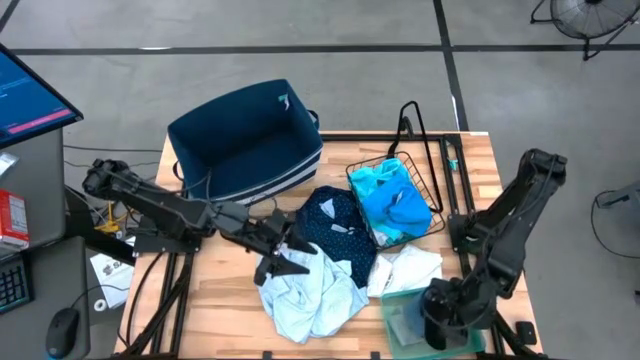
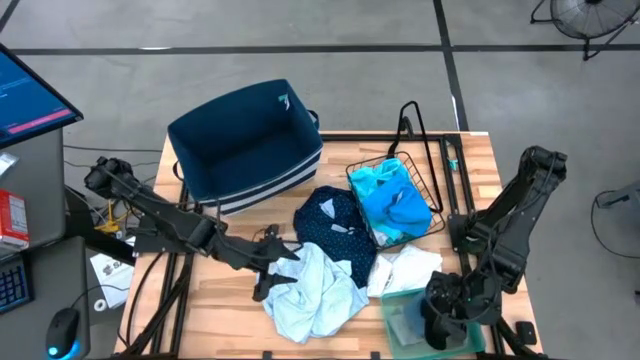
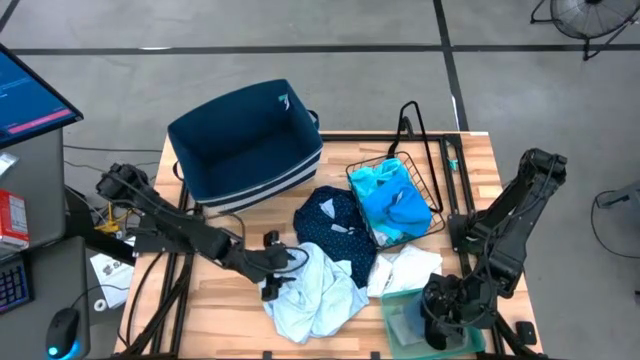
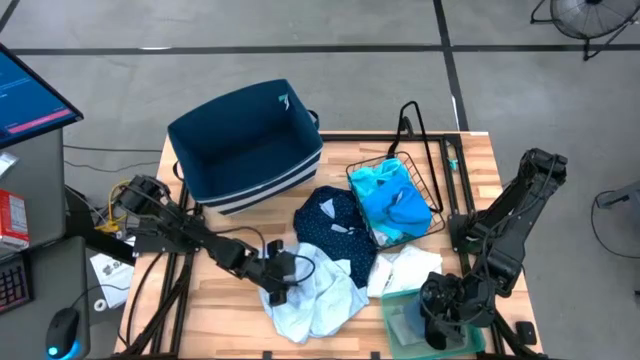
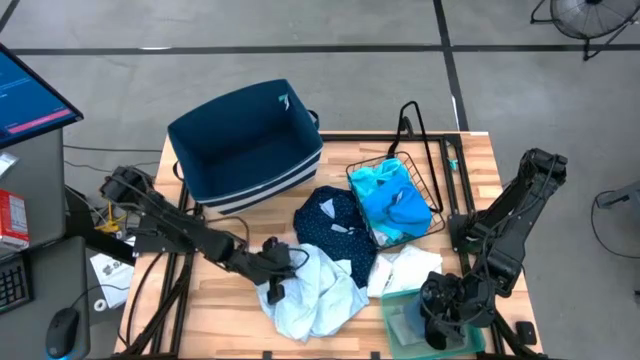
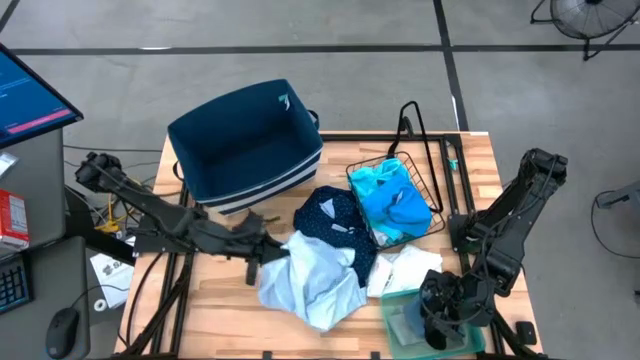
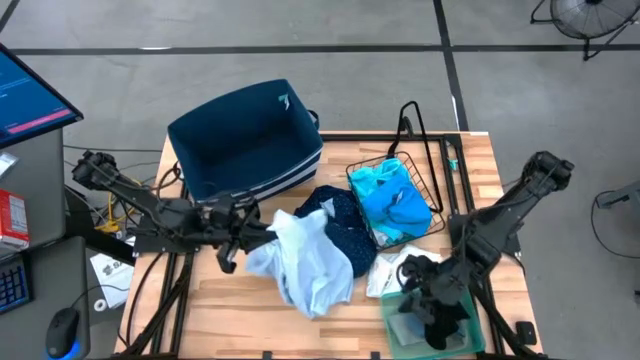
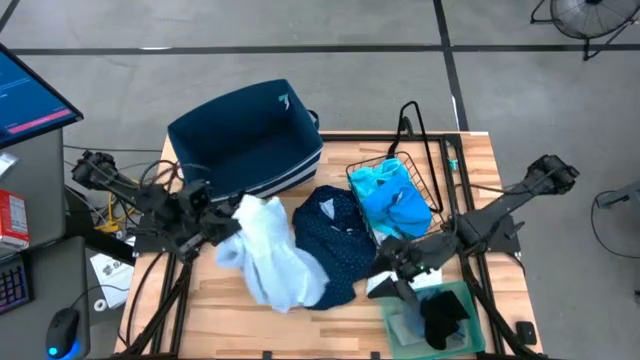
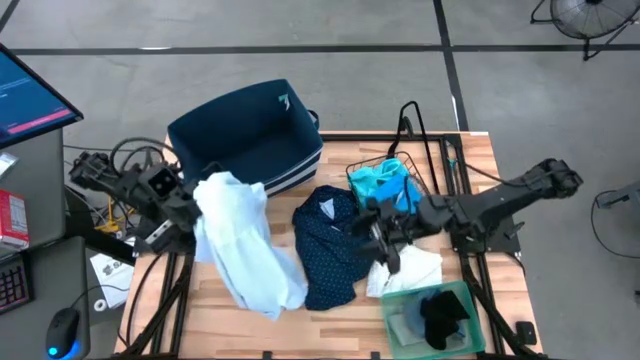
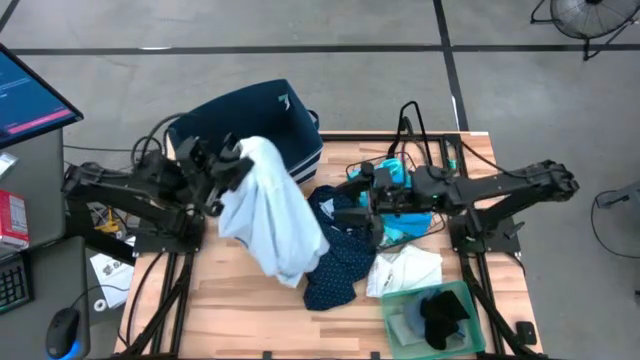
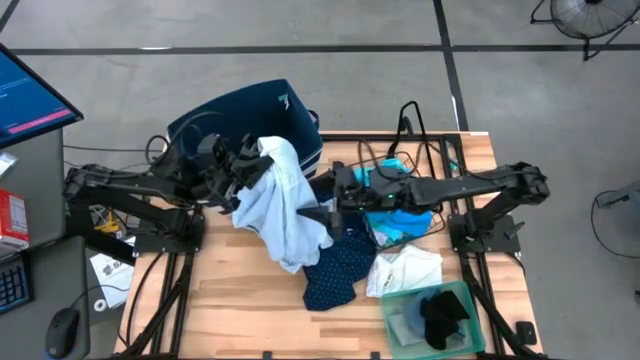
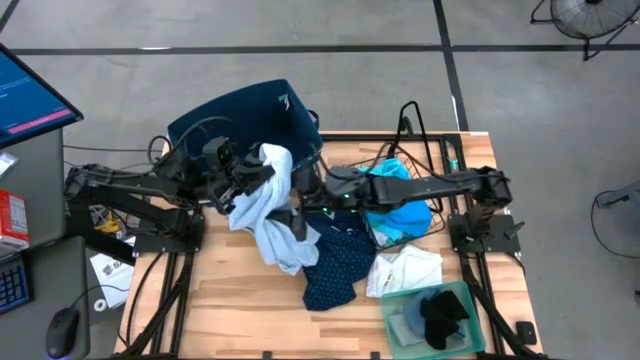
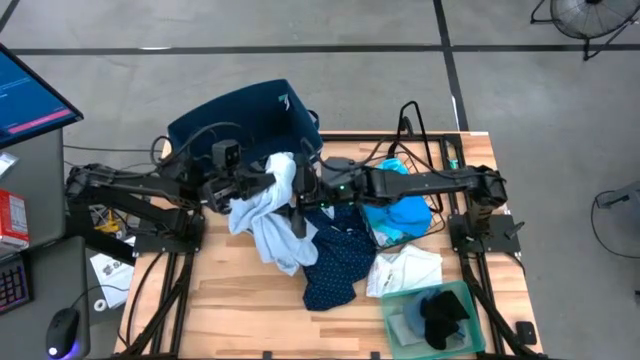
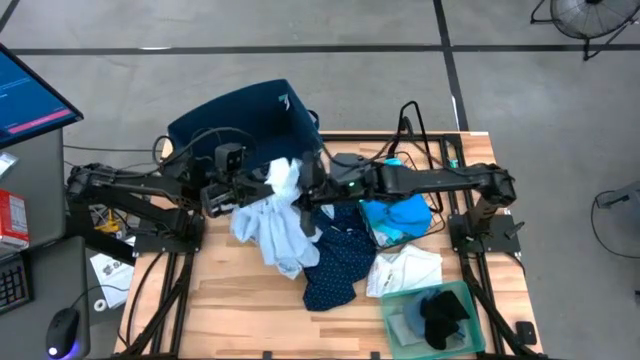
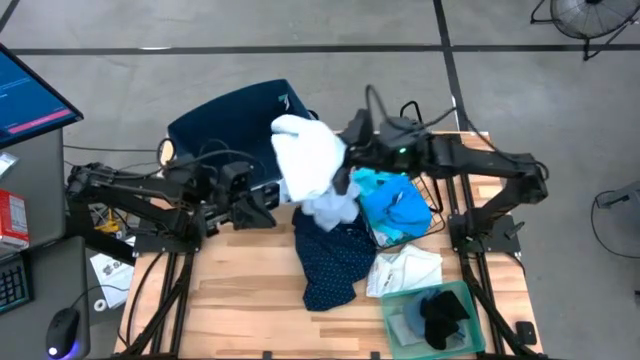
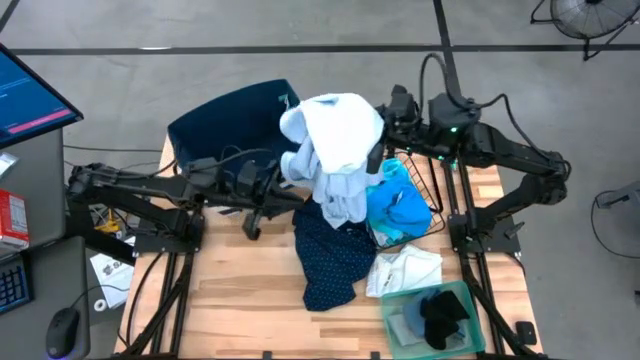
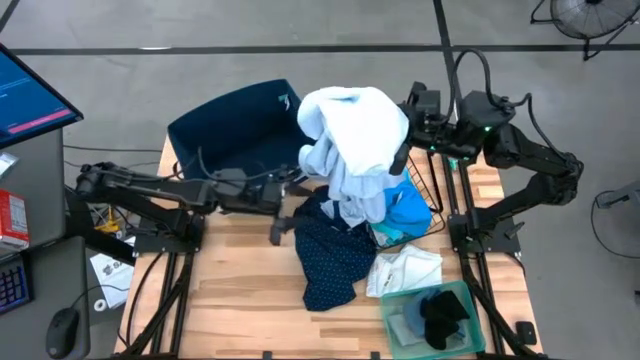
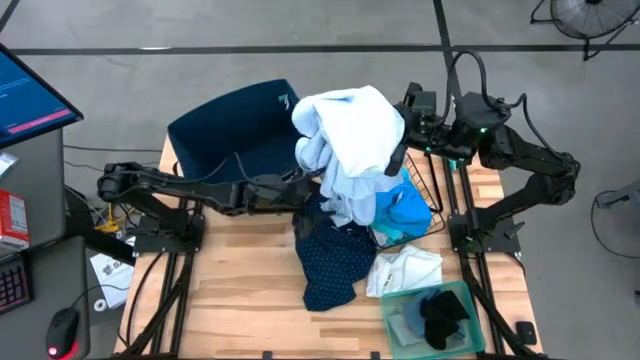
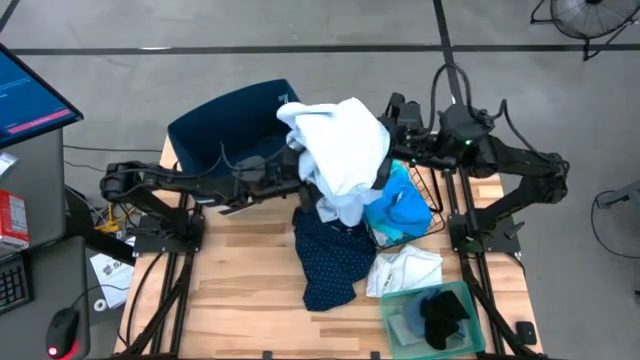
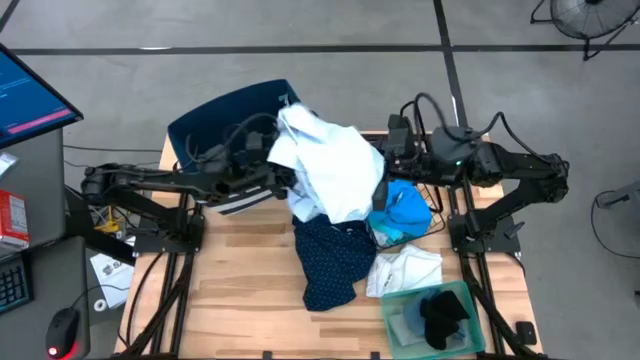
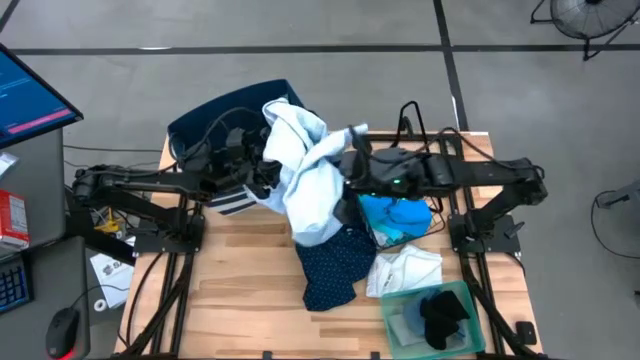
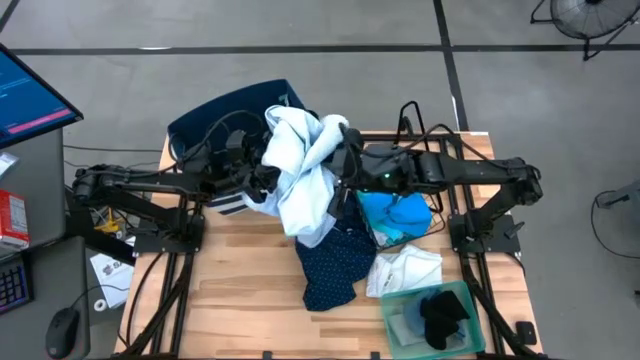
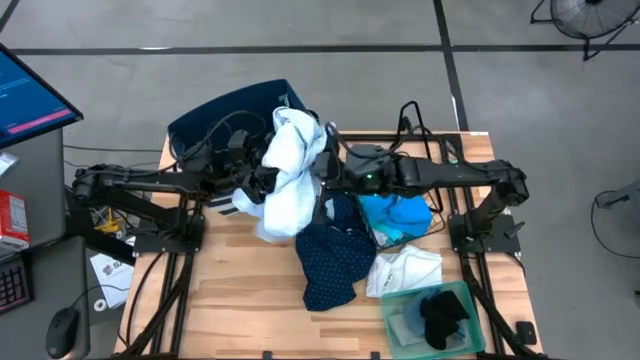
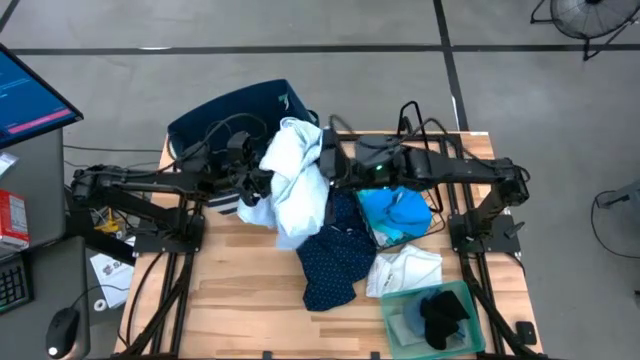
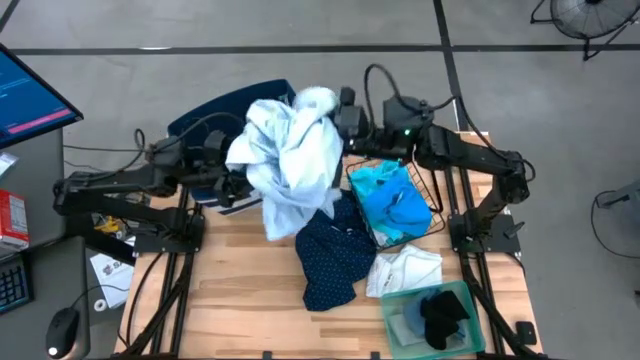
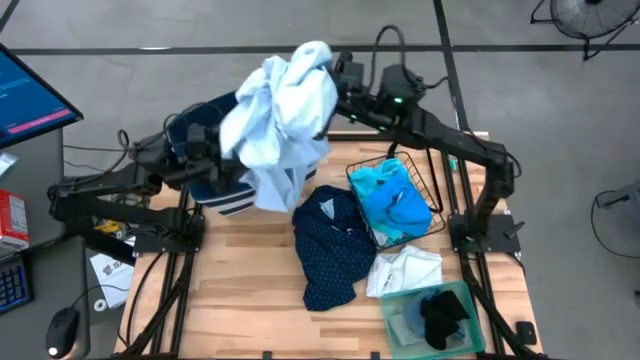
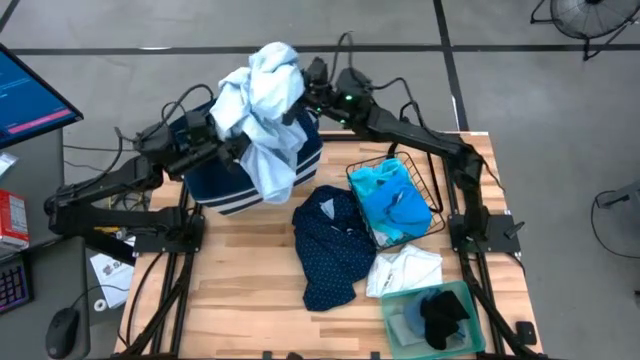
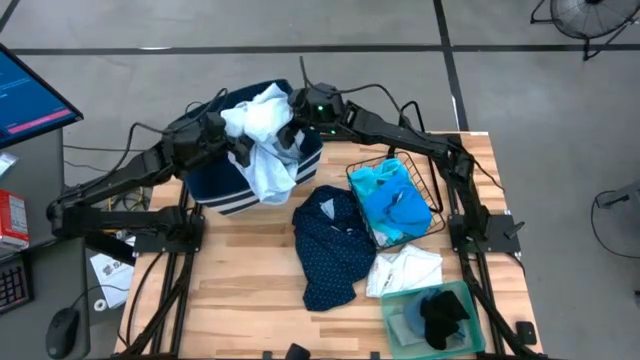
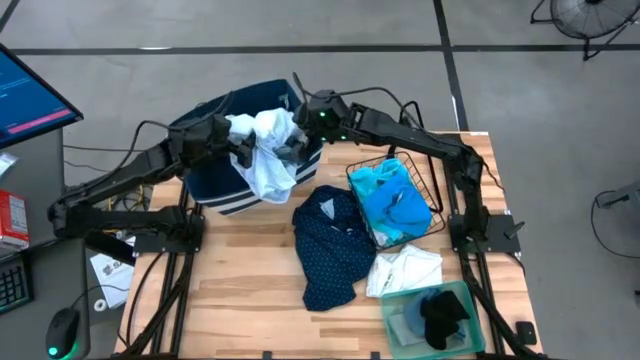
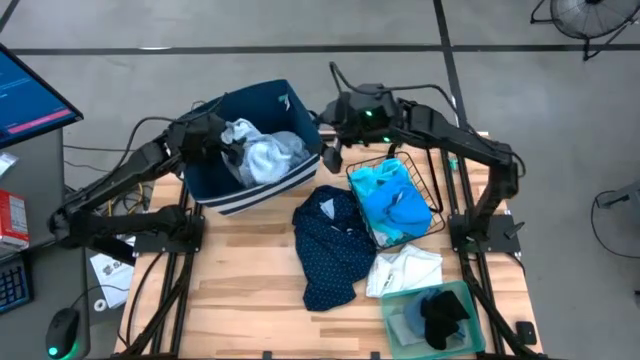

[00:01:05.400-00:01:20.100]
Task: Pick & Place Cloths
Put the light blue shirt into the blue bin

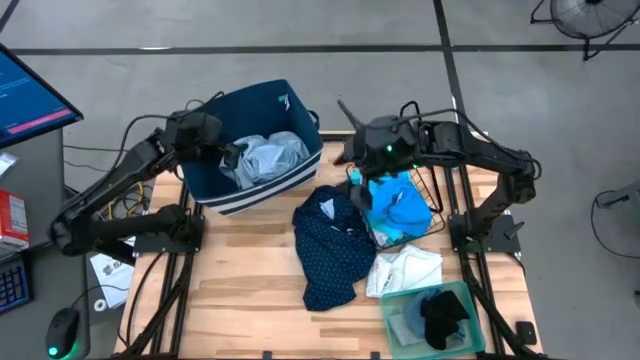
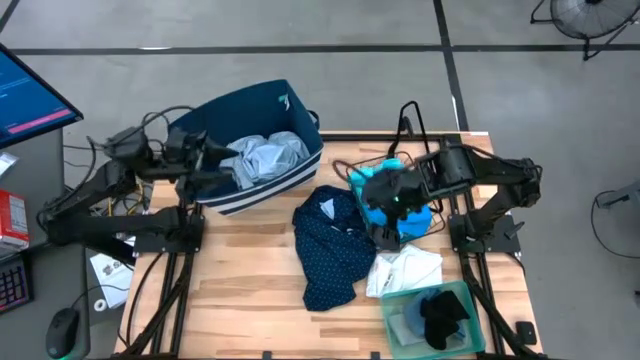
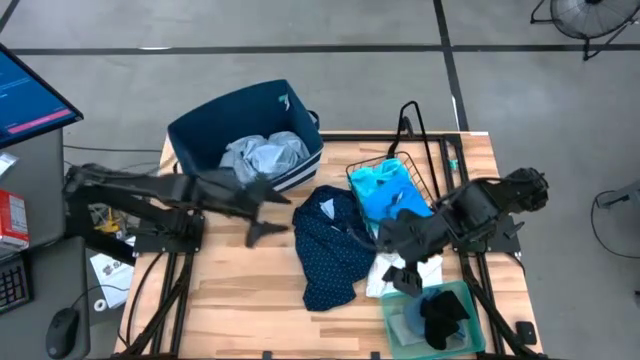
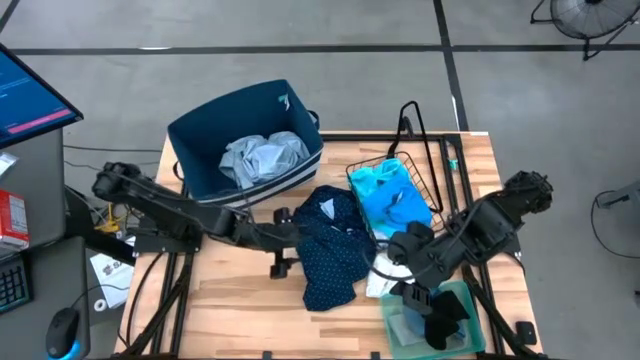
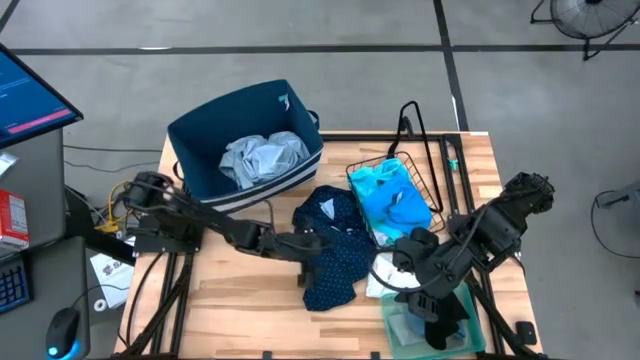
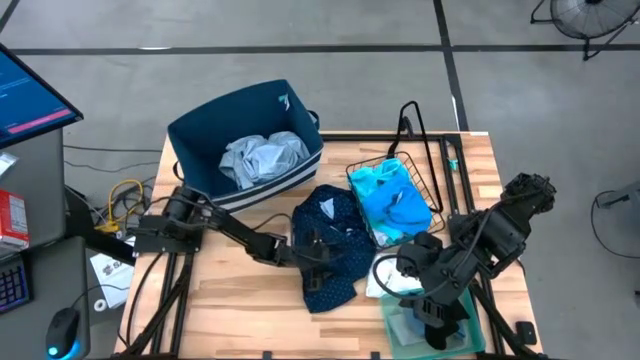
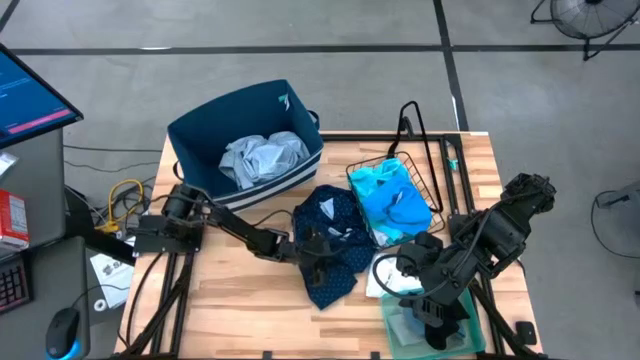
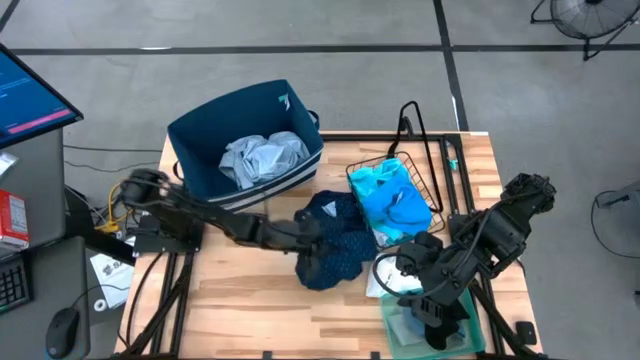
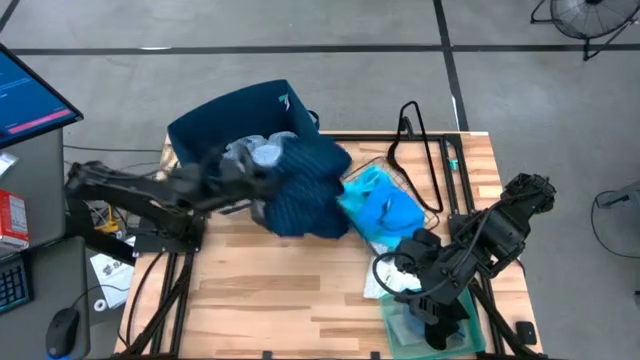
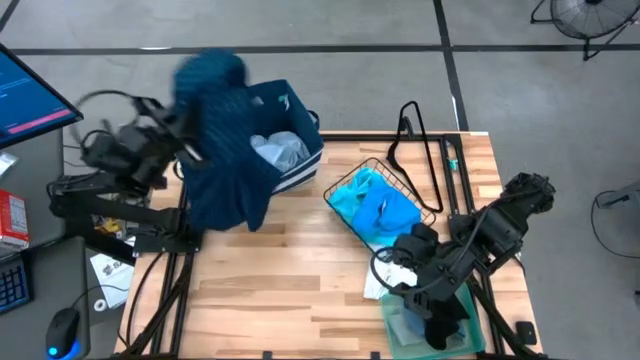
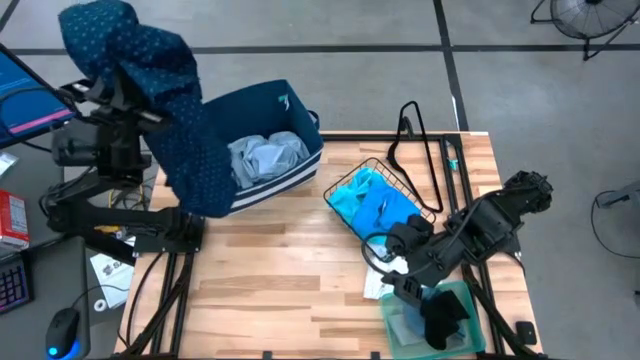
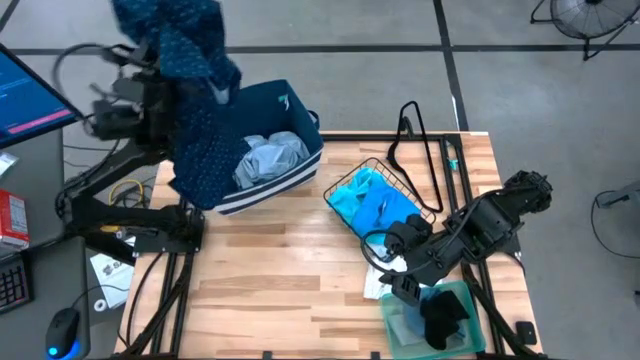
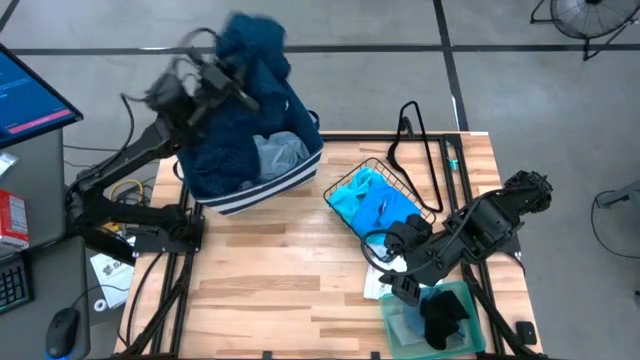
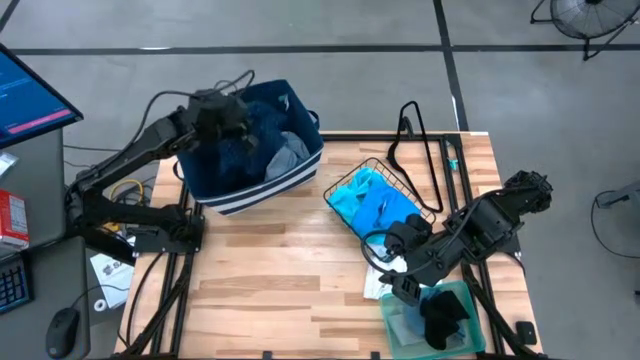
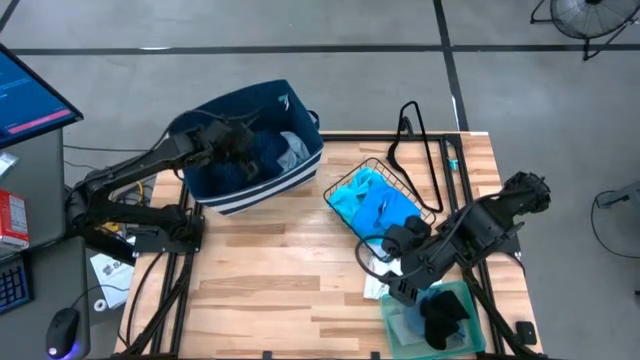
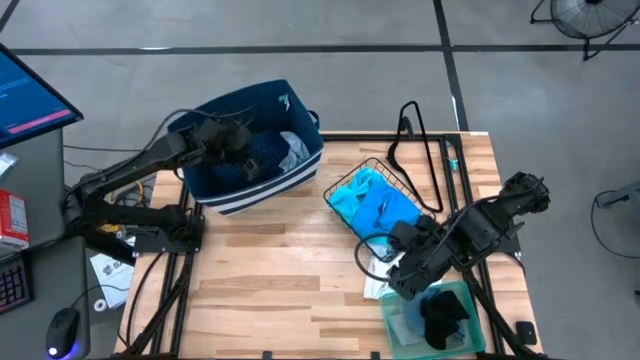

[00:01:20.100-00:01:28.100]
Put the blue shirt into the blue bin
